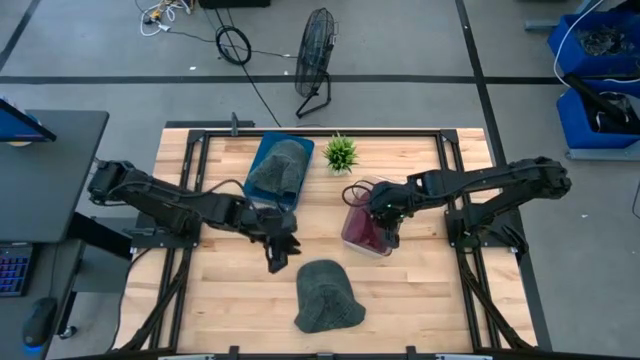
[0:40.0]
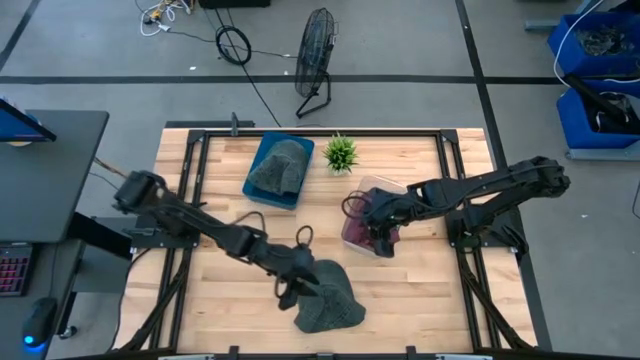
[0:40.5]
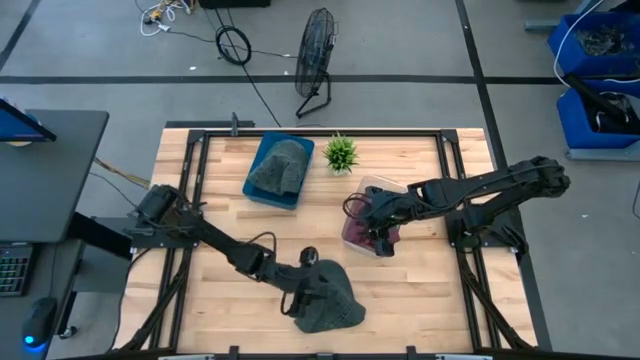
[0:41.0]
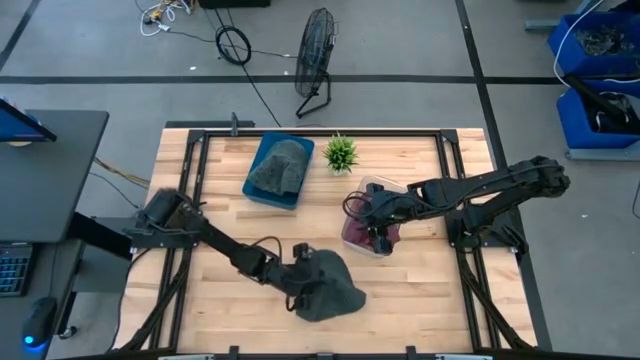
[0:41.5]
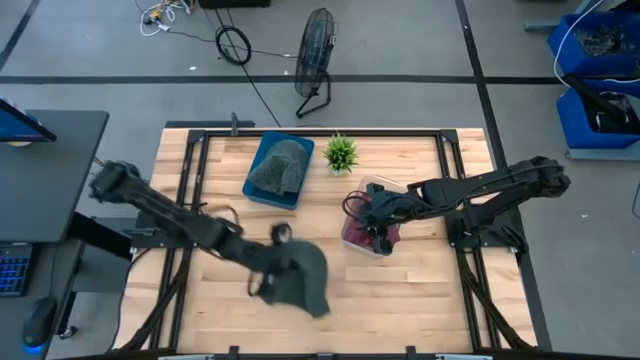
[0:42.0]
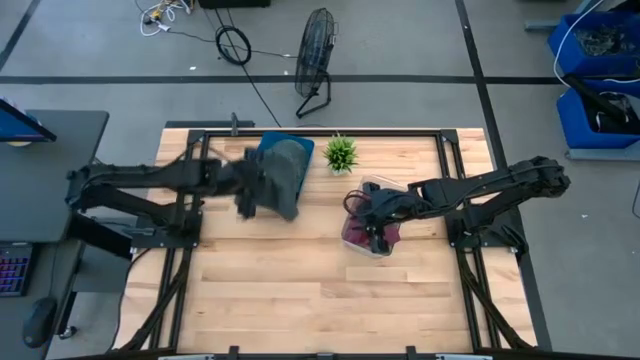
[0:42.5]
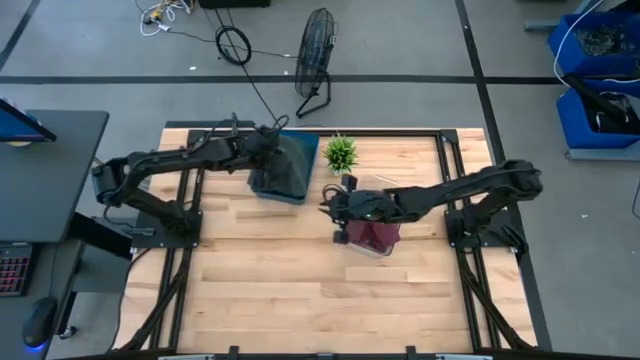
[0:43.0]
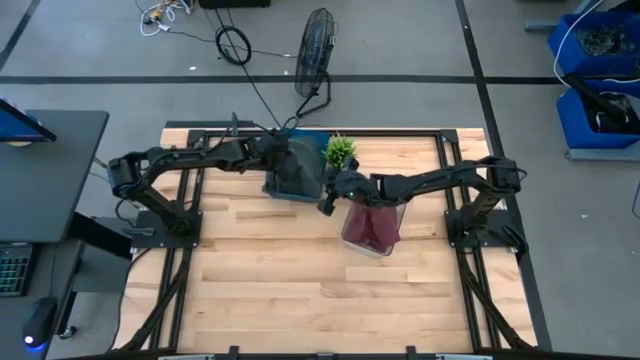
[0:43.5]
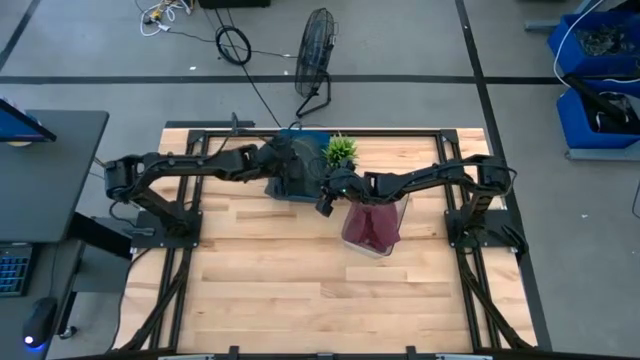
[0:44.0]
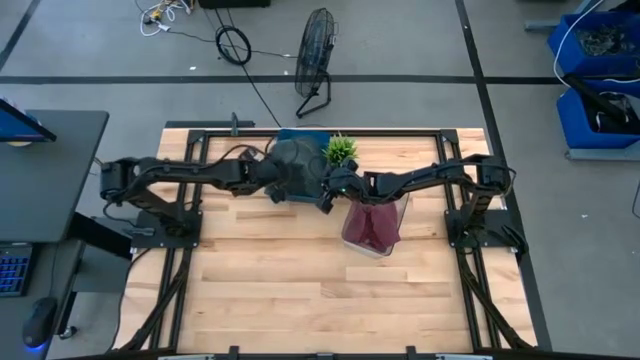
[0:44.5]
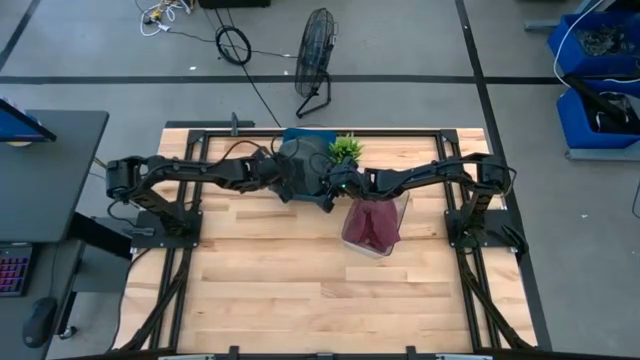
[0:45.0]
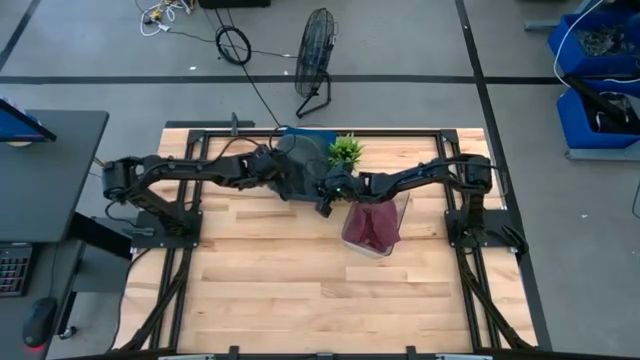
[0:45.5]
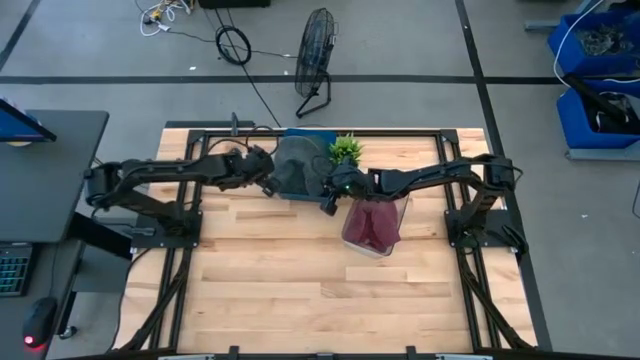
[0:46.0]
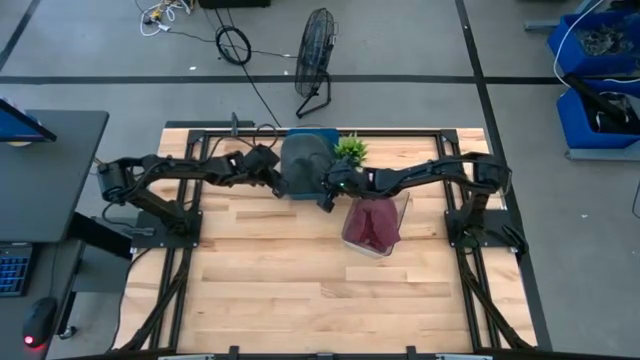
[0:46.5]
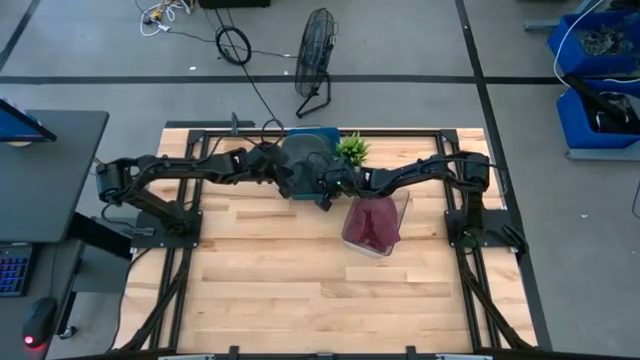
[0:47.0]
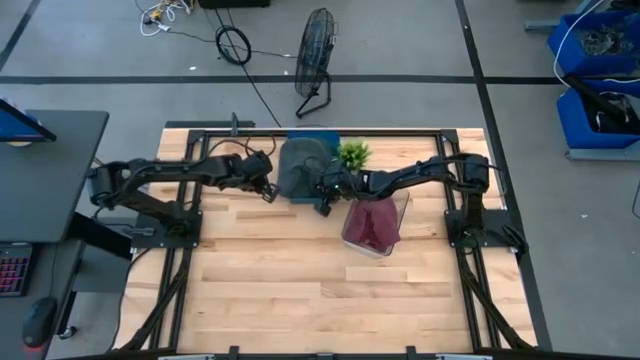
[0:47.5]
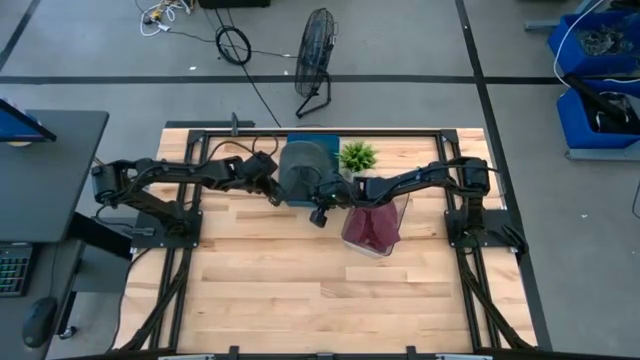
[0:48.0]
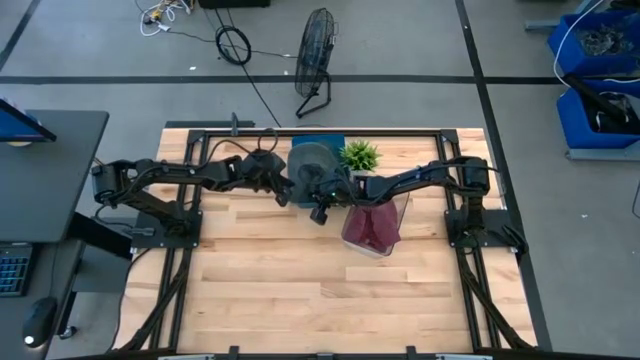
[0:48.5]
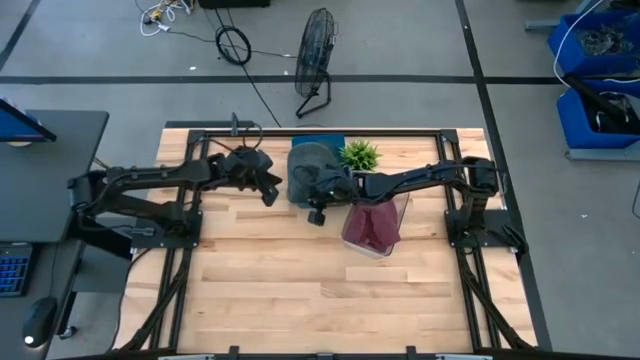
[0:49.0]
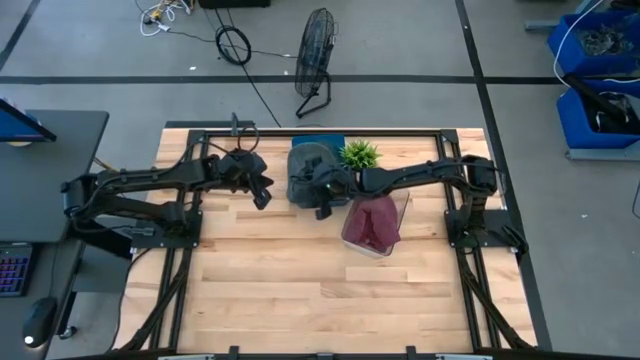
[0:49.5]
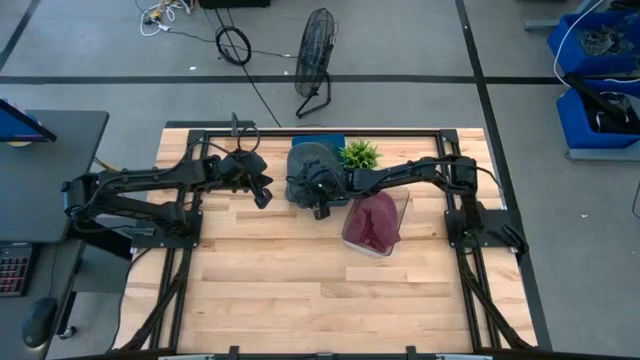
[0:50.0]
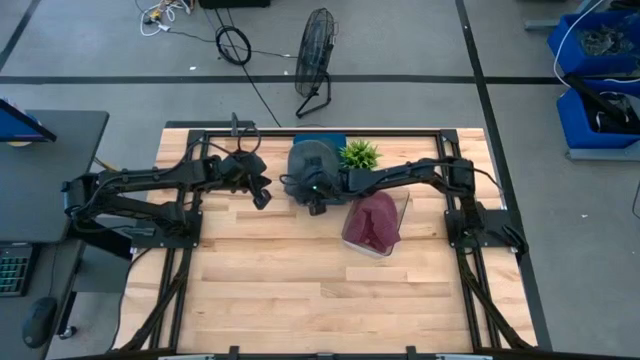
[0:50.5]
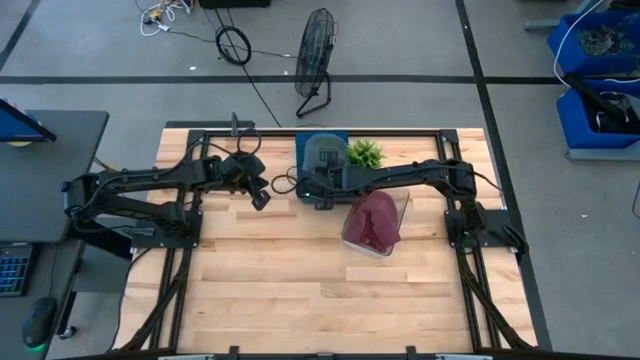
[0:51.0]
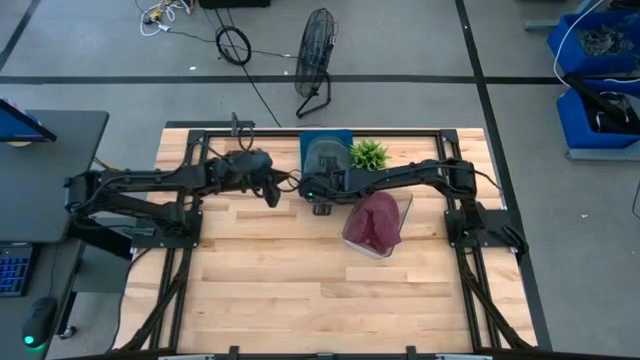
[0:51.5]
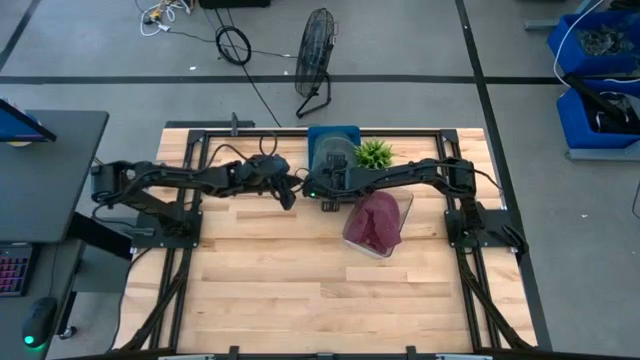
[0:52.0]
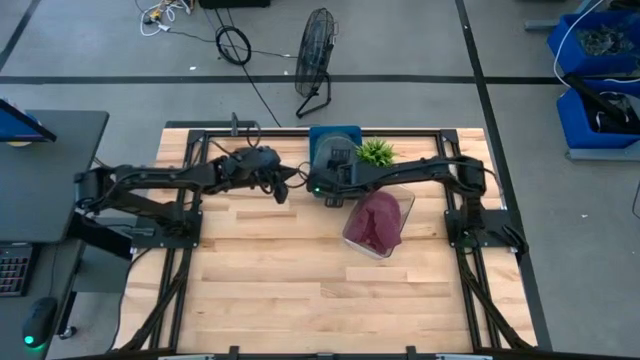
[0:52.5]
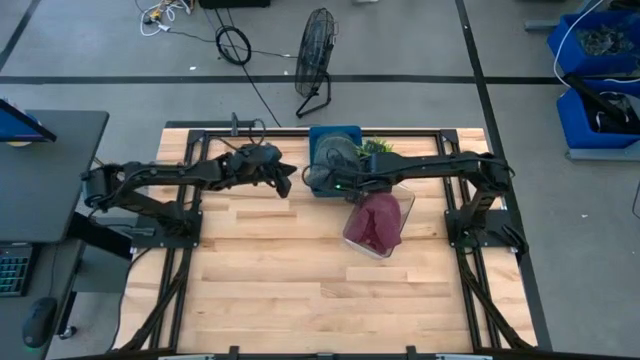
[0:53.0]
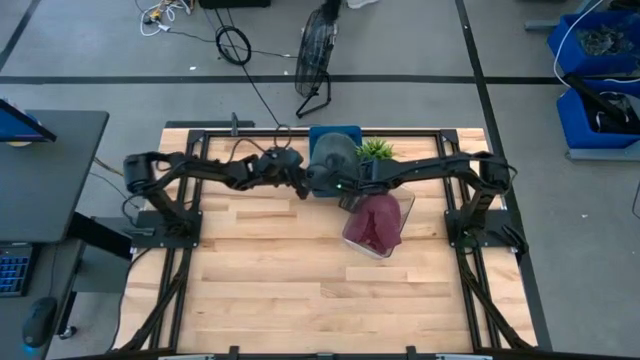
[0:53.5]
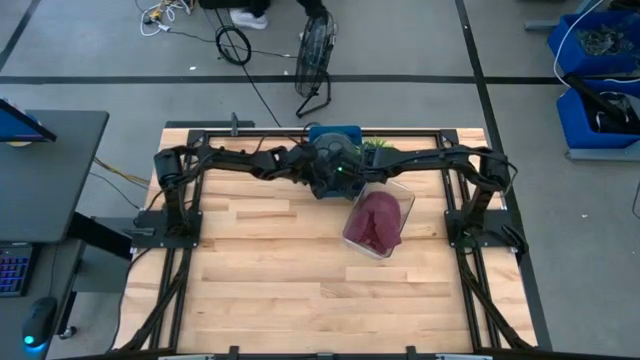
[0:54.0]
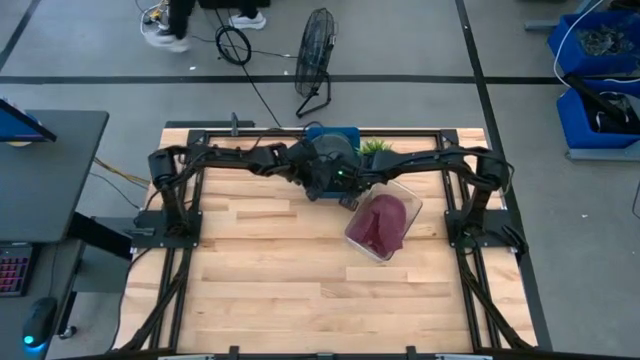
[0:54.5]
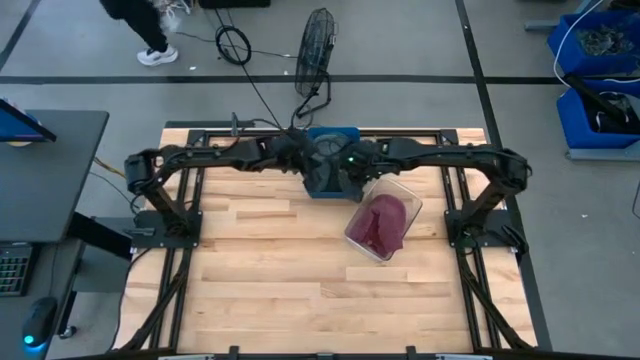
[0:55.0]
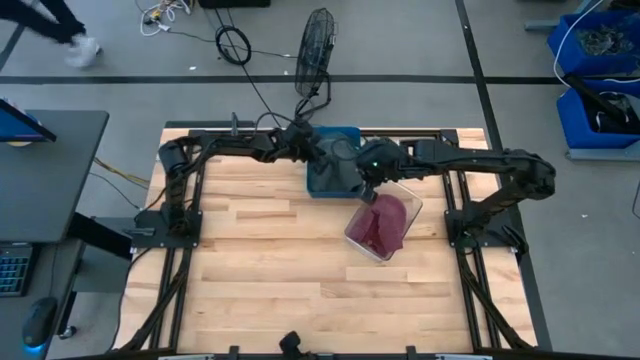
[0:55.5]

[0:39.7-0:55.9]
Task: Pick & Place hat
Put the black cap into the blue bin

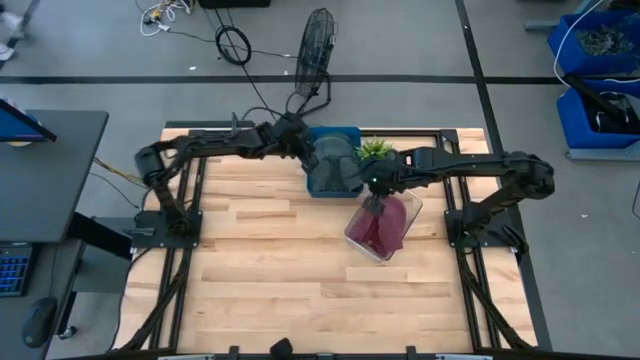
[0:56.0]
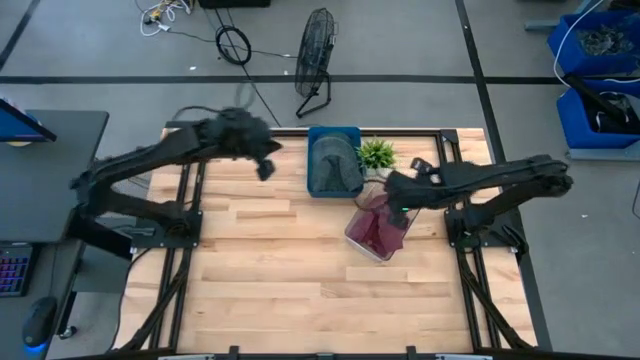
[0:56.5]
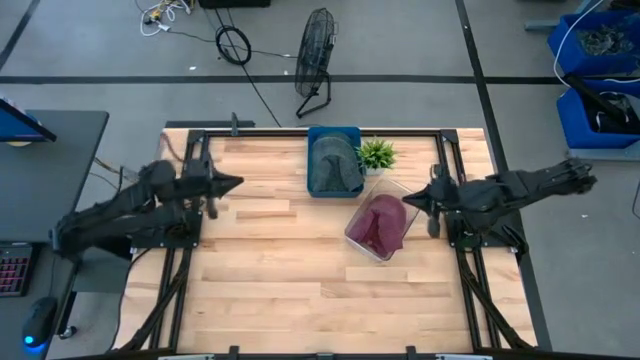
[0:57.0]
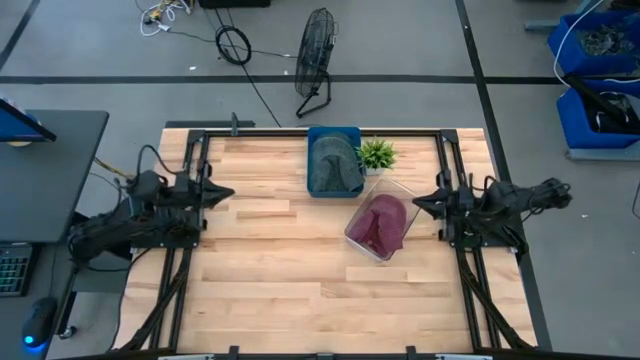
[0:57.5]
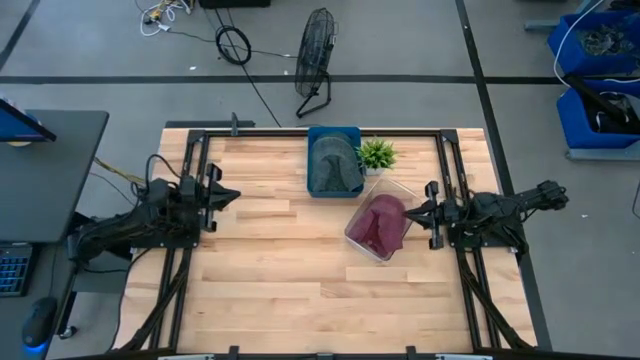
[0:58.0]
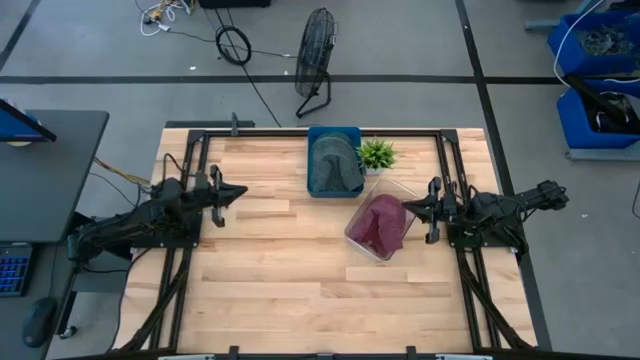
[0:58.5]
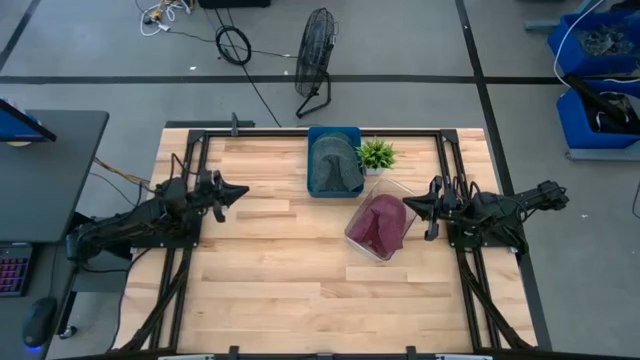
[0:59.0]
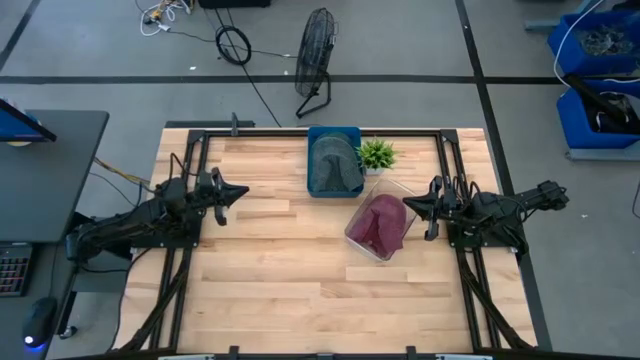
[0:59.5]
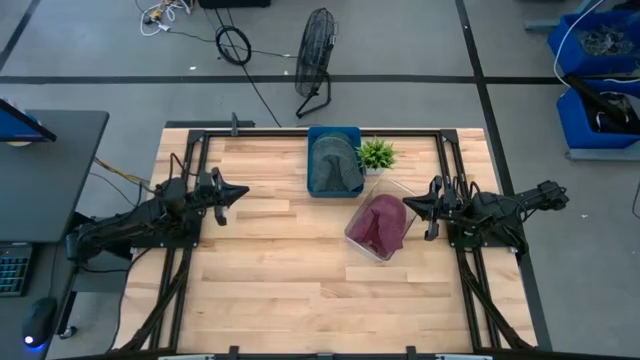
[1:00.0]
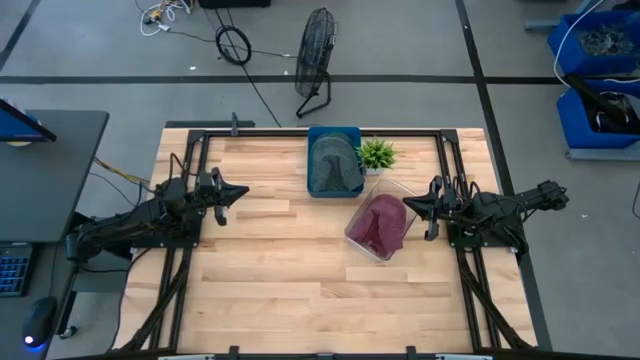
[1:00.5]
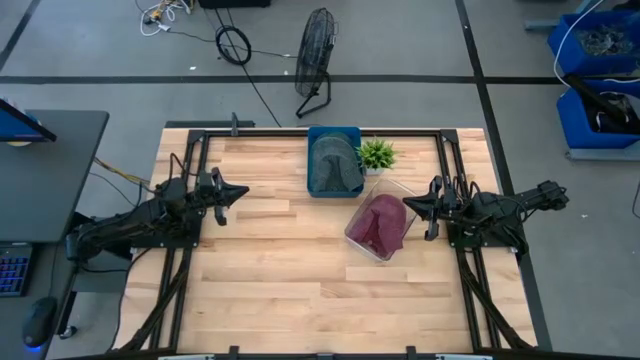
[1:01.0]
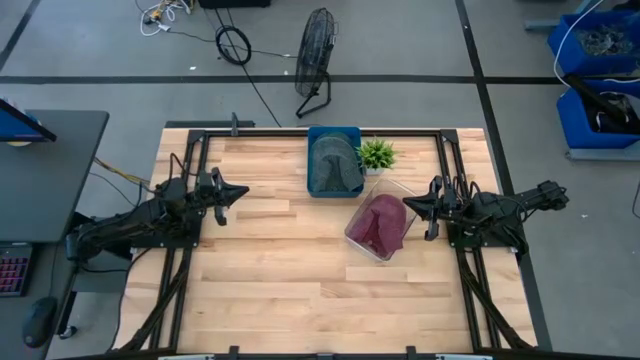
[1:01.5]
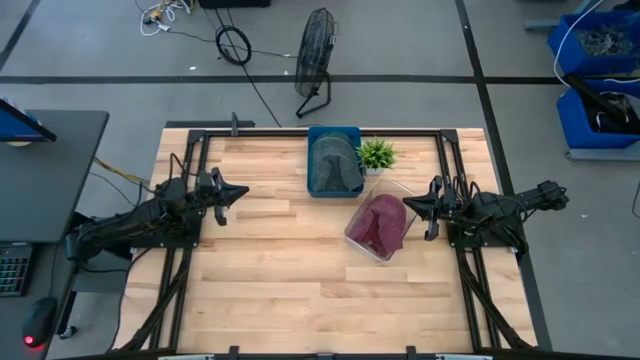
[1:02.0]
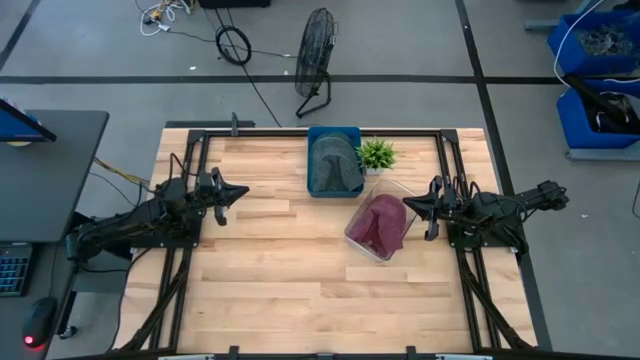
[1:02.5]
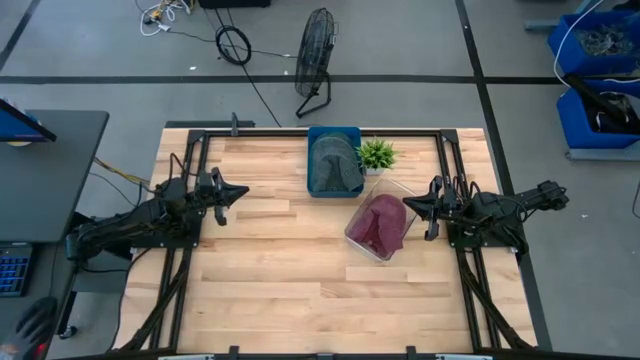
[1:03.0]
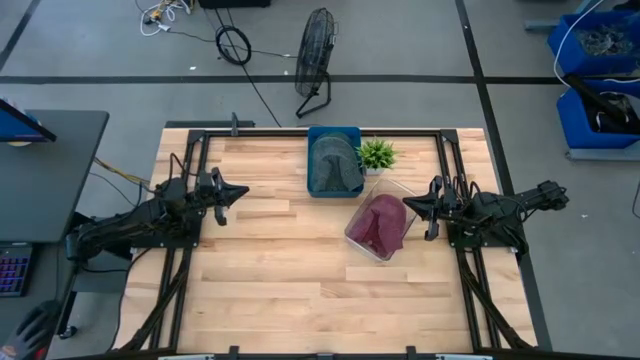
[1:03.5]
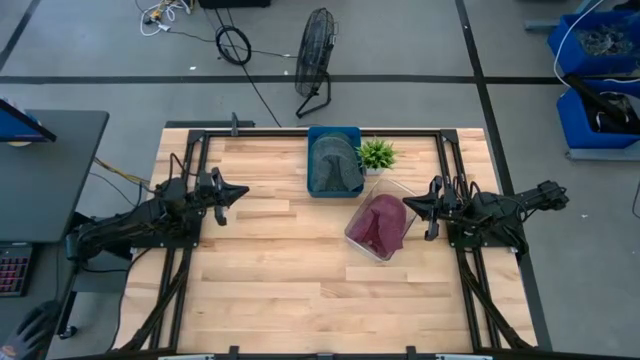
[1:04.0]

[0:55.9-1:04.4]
Return to Home Position
